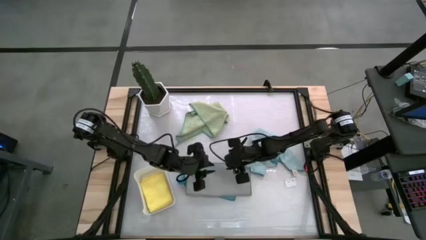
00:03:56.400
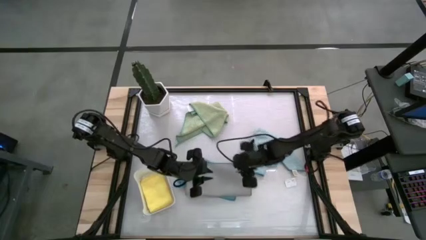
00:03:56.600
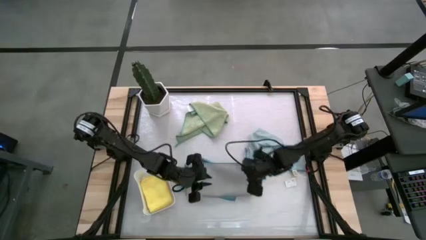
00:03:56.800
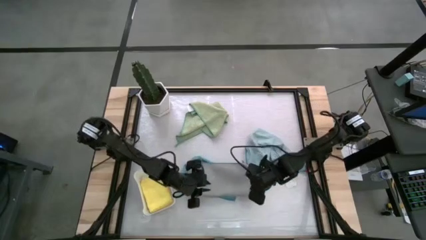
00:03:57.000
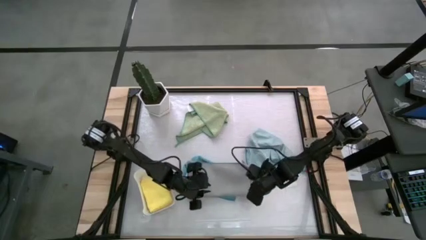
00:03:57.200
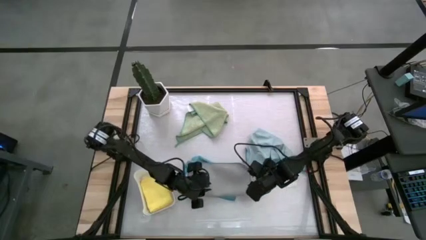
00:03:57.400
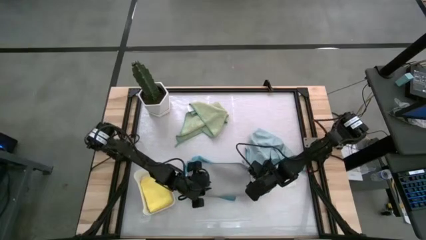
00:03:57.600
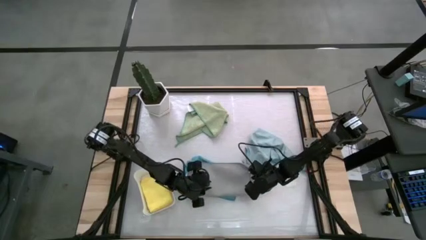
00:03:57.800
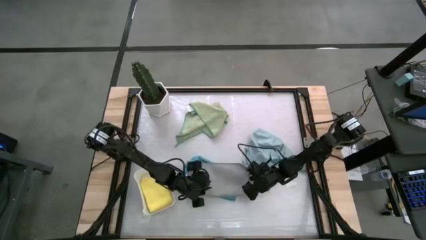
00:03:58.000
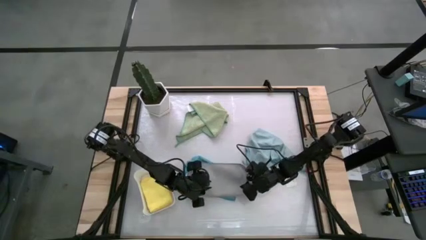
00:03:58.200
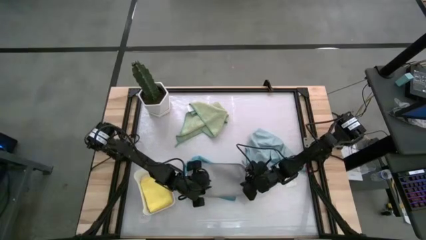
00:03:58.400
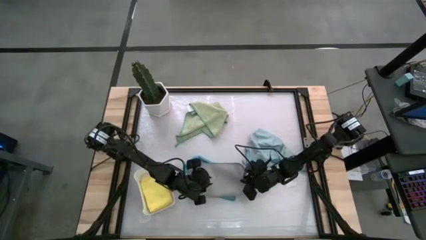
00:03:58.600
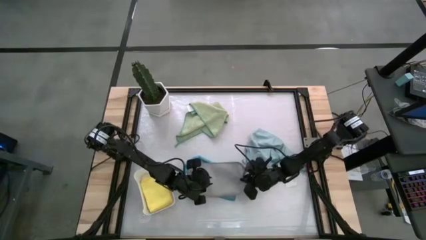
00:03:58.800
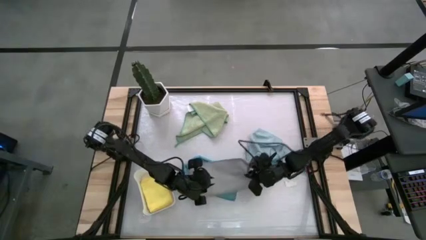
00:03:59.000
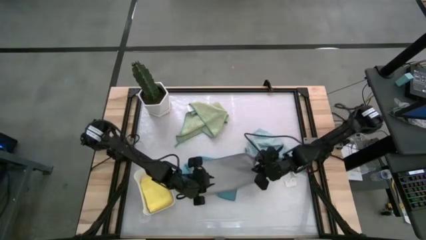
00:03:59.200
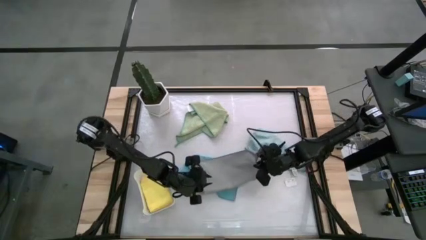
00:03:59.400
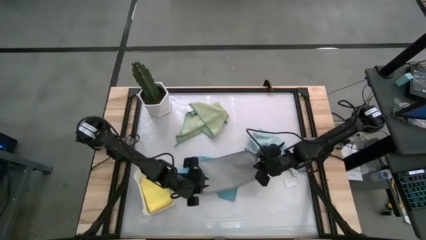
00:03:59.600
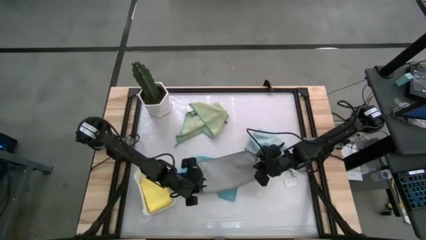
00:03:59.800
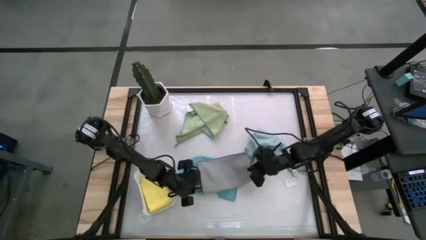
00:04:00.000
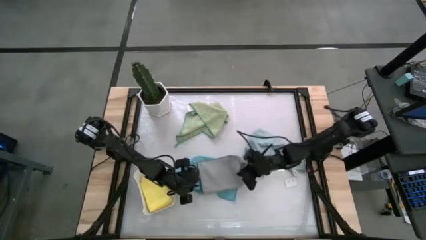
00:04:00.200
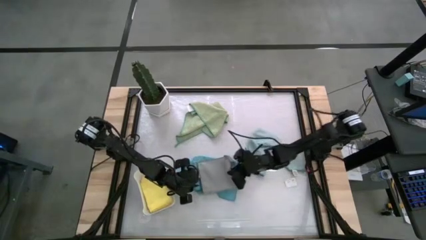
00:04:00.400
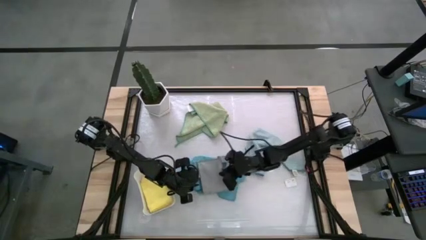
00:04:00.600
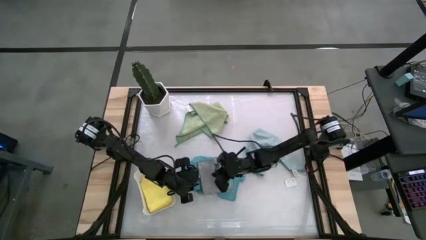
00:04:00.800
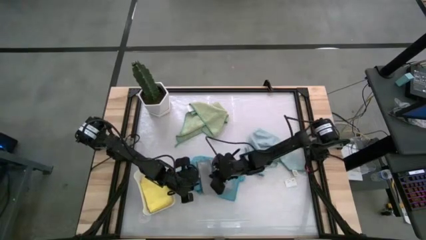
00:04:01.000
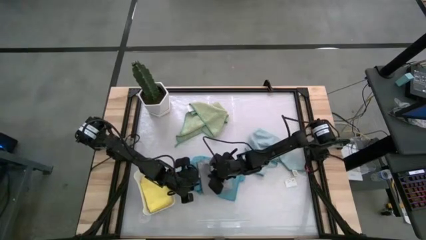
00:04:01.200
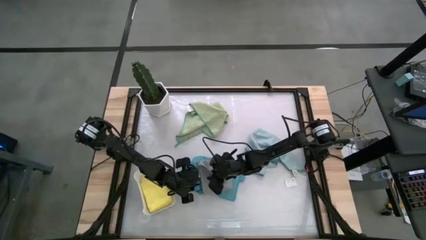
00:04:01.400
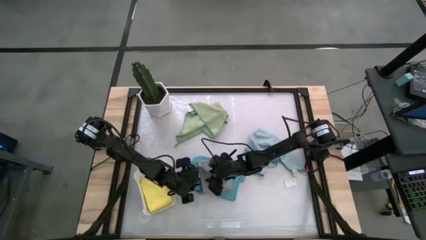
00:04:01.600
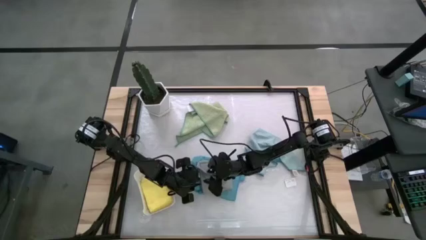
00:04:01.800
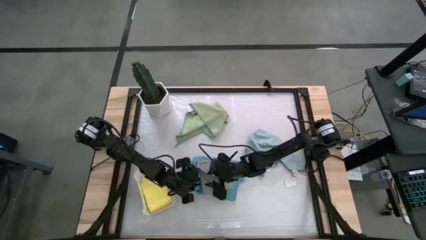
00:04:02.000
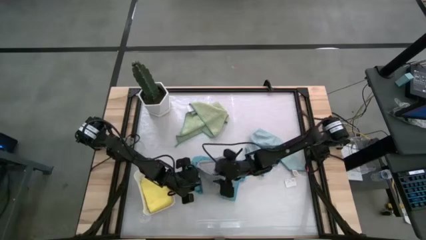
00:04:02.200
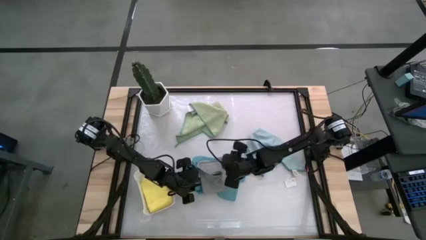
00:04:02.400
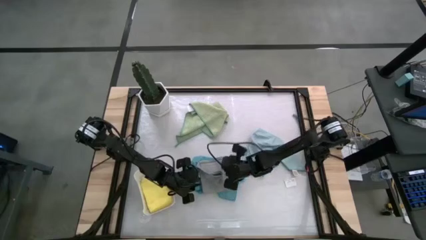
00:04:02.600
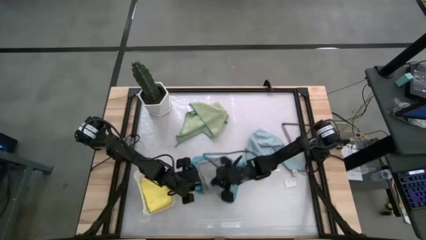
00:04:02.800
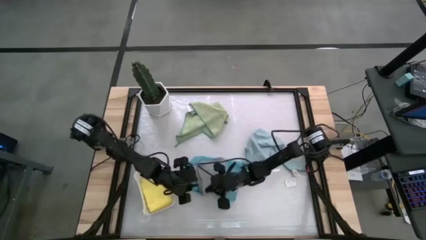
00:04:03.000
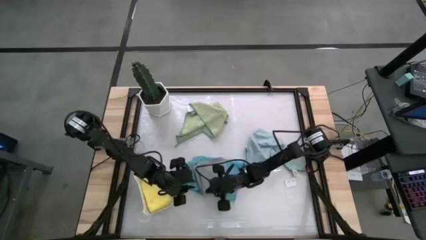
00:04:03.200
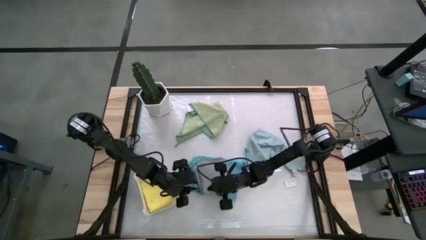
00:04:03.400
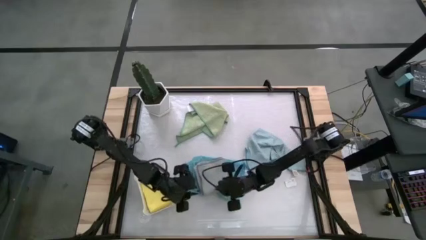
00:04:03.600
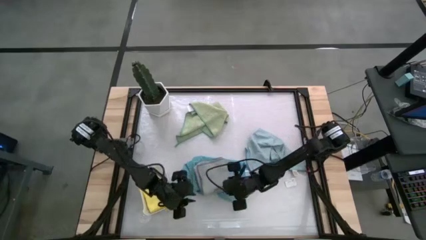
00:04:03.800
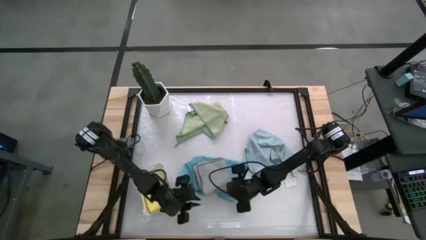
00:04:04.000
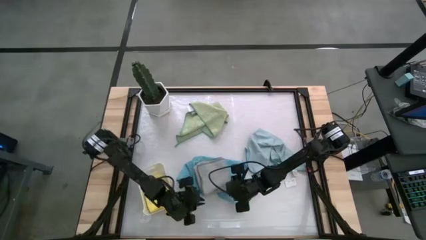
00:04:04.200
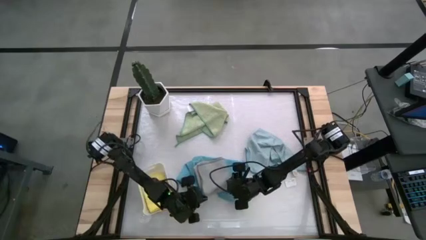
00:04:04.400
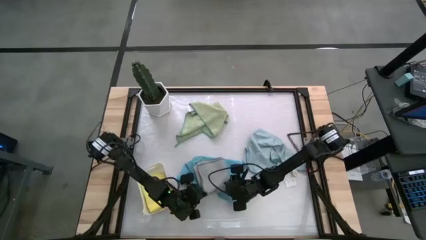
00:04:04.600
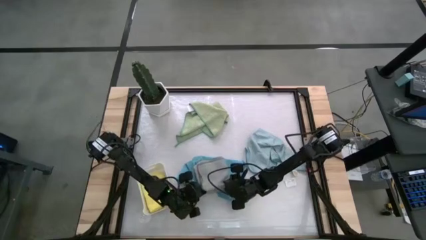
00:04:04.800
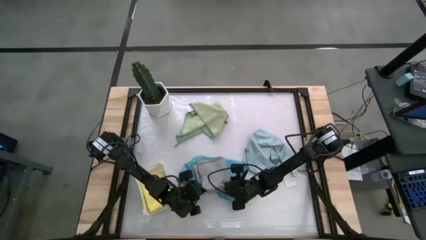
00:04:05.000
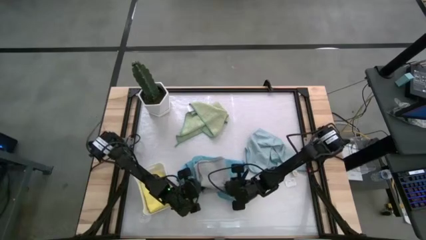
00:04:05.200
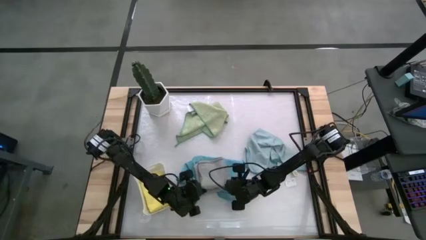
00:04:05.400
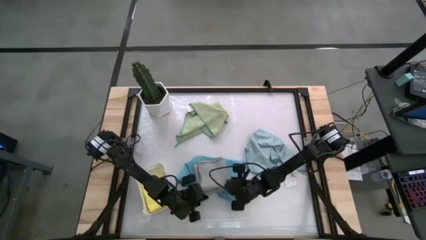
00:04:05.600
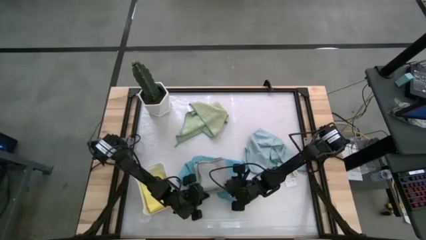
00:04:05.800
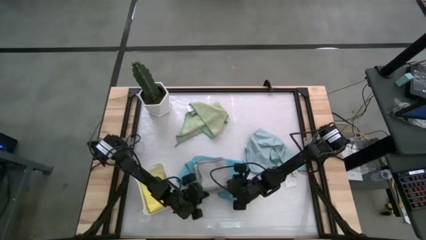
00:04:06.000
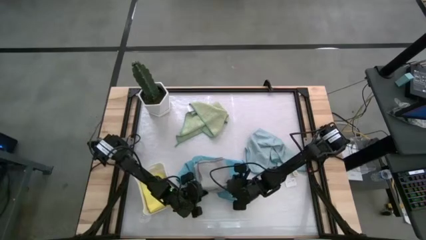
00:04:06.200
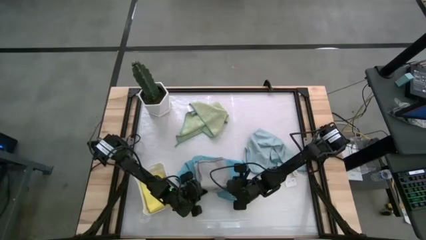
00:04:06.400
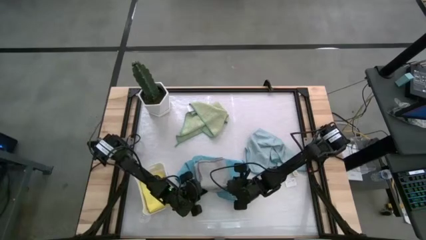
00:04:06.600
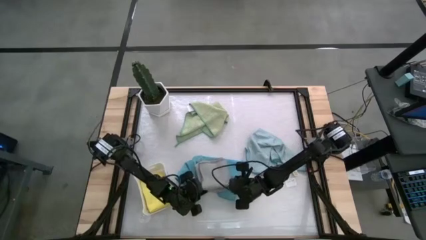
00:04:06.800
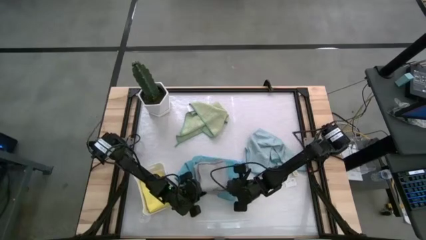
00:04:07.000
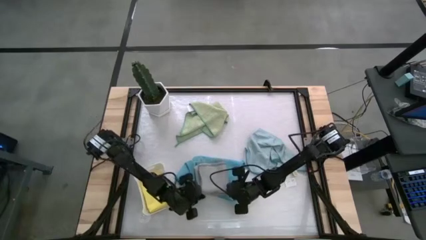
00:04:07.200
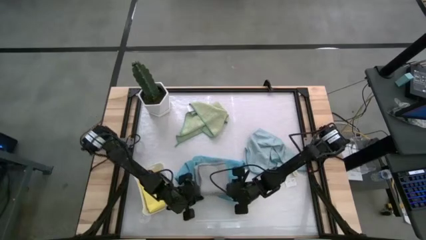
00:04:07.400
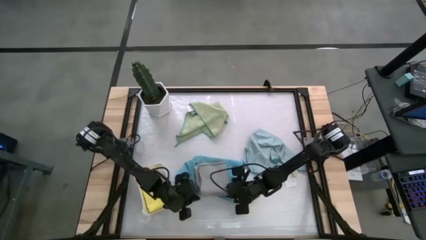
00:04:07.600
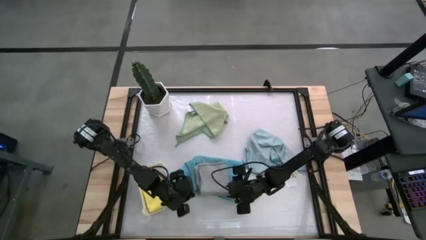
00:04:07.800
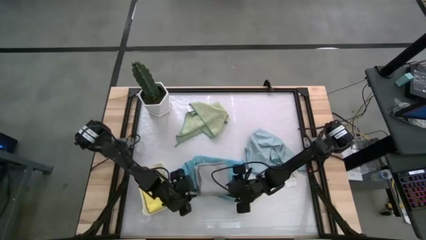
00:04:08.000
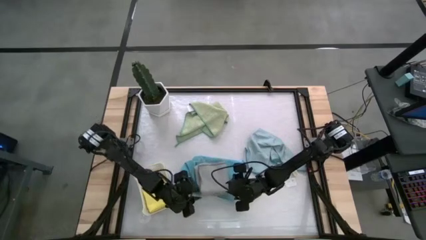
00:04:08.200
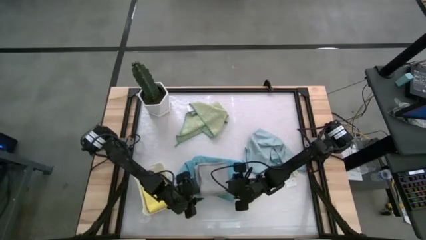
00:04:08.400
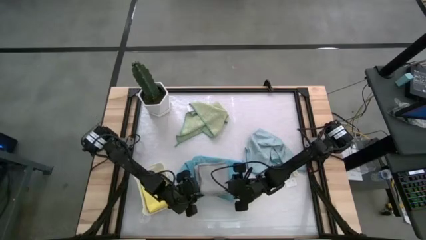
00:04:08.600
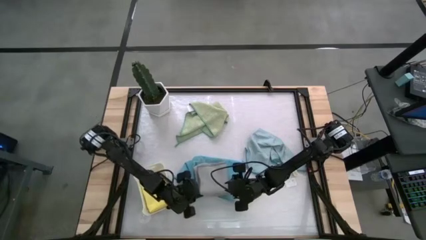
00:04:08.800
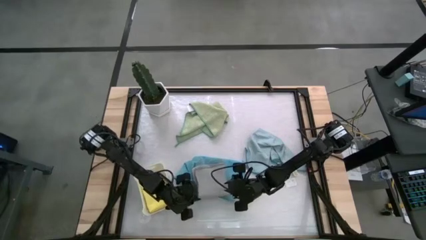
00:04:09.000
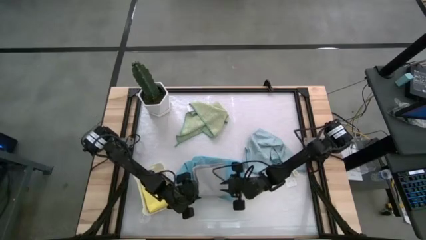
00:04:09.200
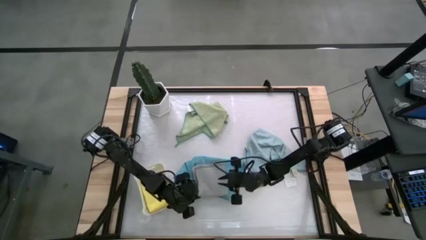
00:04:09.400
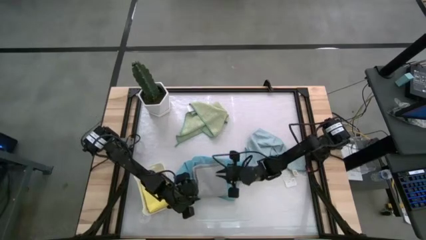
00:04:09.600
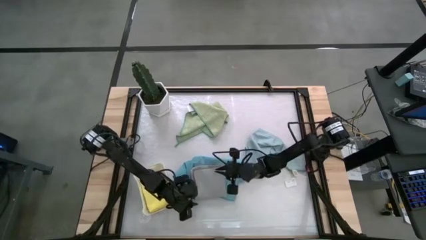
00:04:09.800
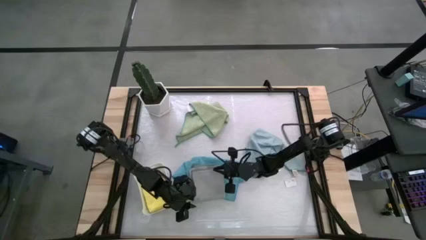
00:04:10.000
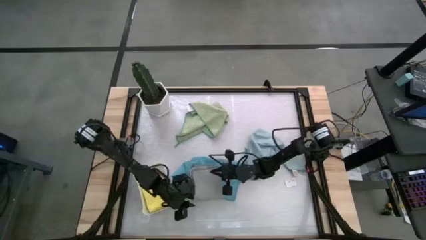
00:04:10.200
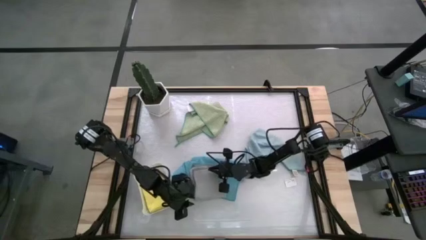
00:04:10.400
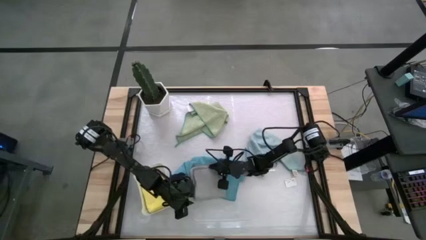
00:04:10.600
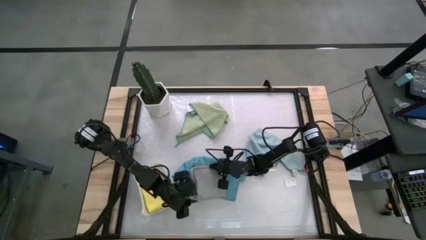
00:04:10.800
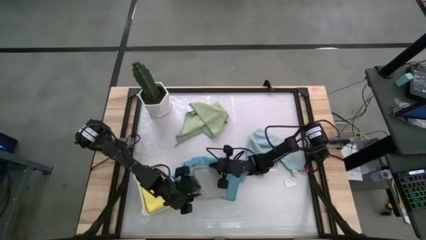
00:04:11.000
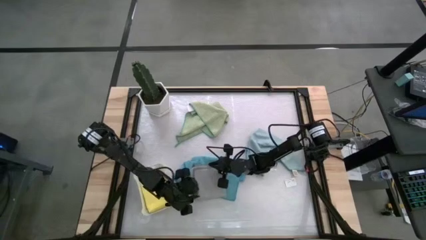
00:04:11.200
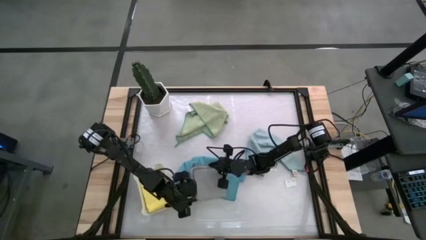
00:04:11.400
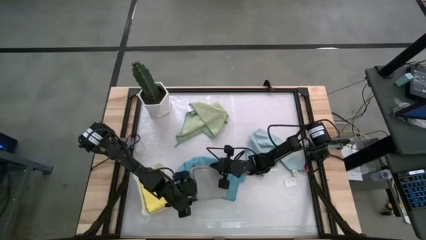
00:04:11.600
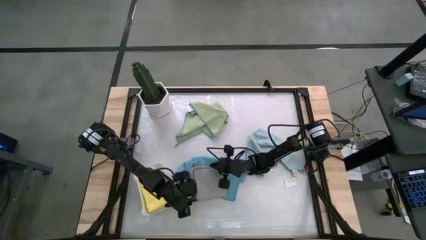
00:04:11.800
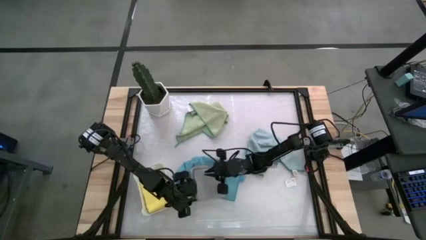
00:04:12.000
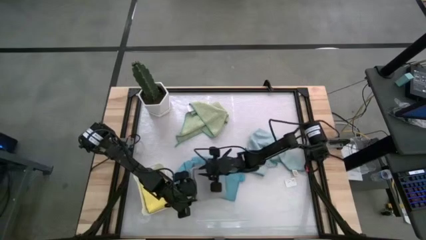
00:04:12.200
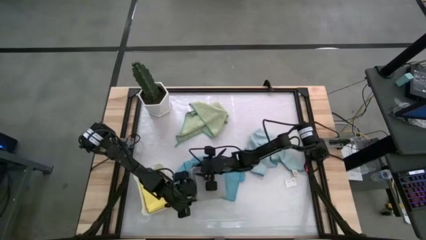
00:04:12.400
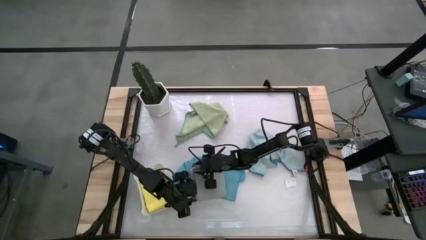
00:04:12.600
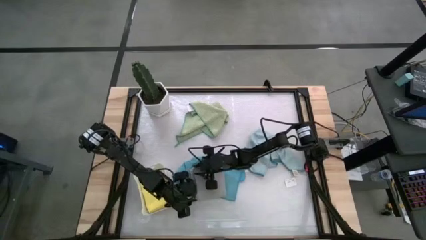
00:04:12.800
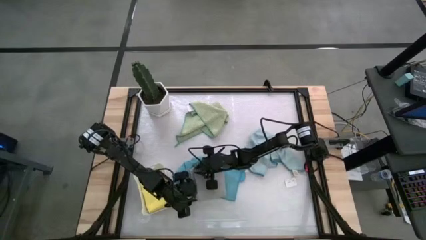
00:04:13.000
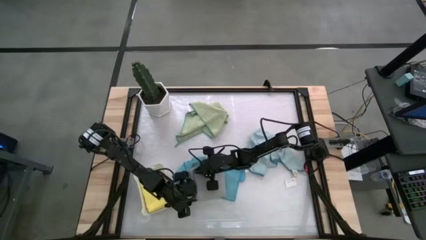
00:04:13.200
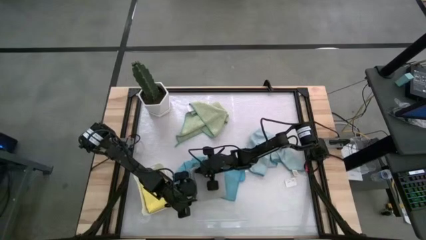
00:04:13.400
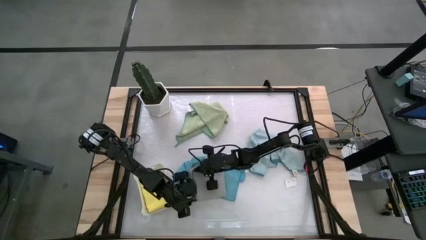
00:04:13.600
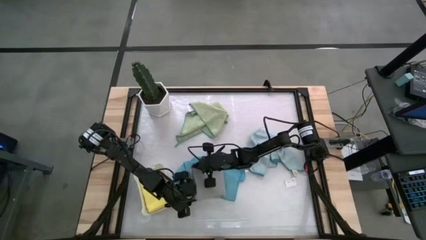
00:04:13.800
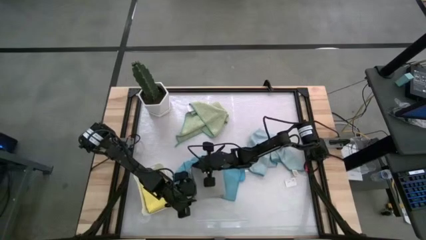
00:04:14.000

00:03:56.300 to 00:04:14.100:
Task: Fold microfiber towels
Fold the gray microfiber towel
